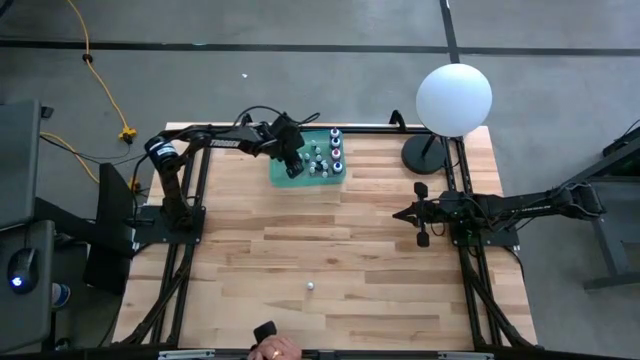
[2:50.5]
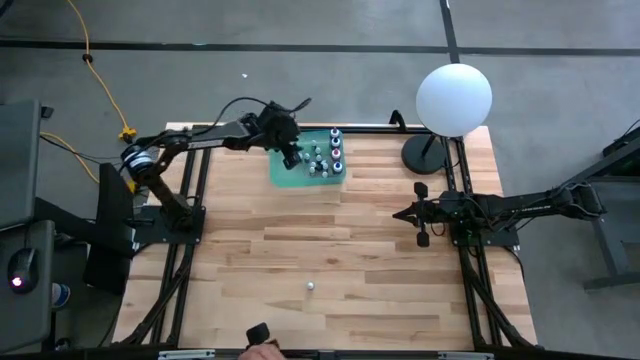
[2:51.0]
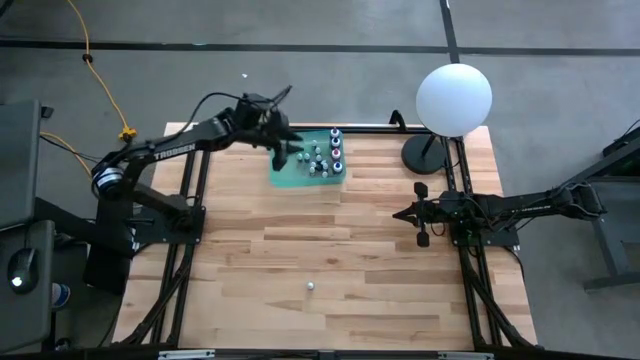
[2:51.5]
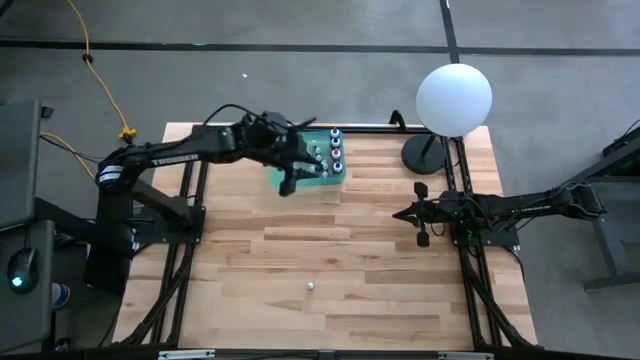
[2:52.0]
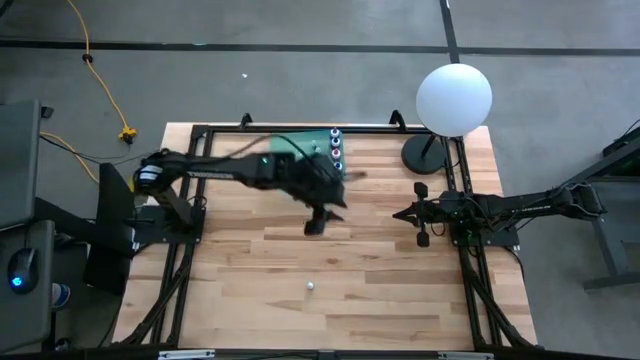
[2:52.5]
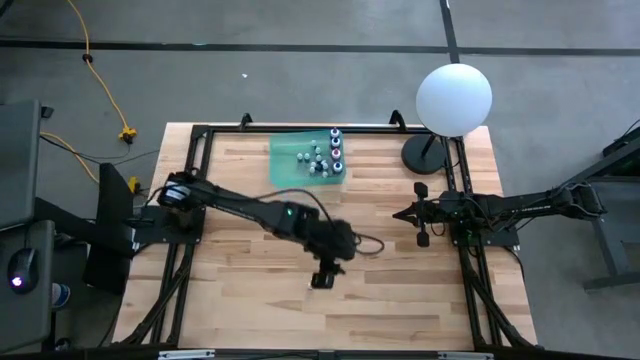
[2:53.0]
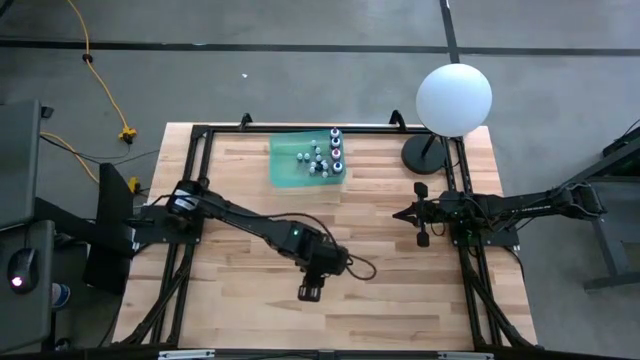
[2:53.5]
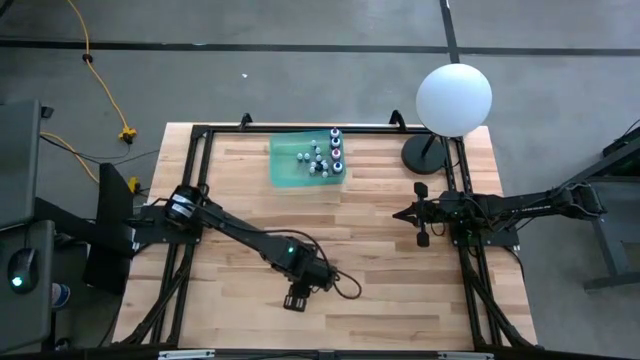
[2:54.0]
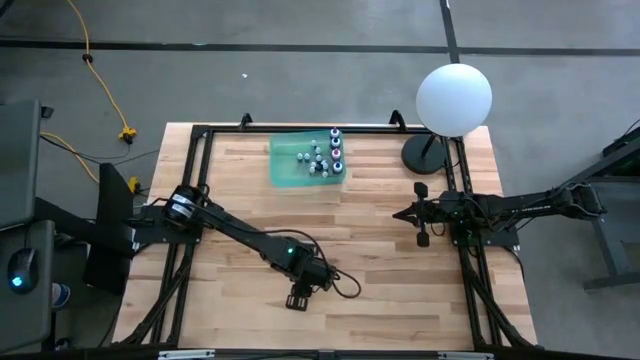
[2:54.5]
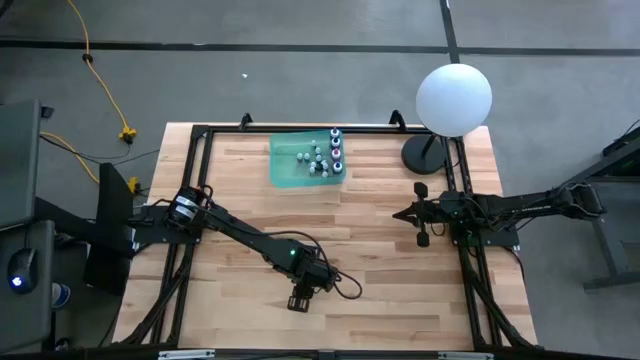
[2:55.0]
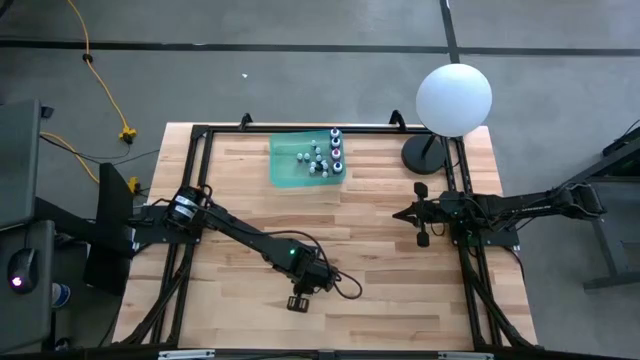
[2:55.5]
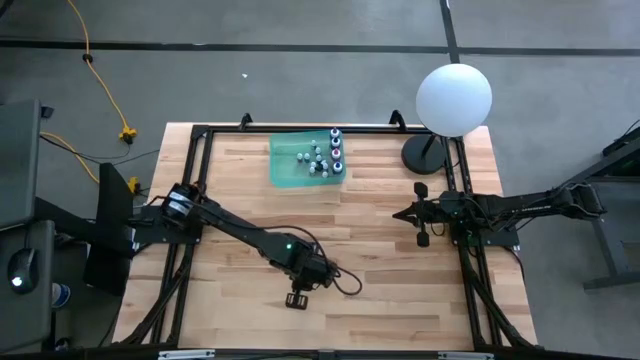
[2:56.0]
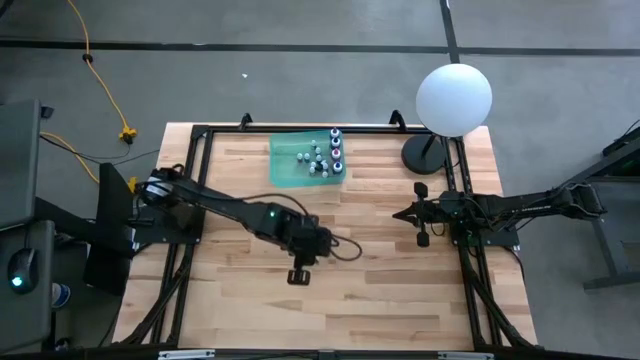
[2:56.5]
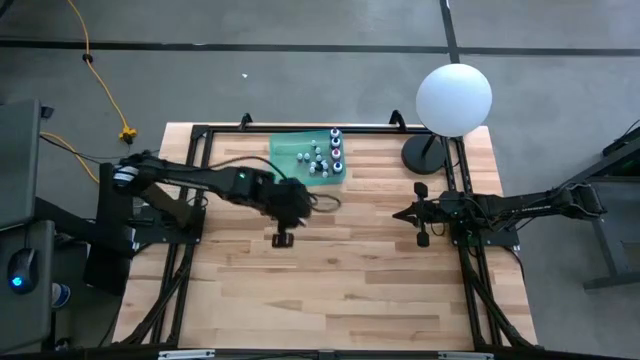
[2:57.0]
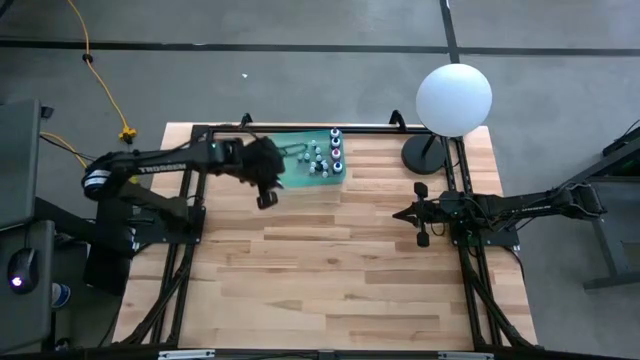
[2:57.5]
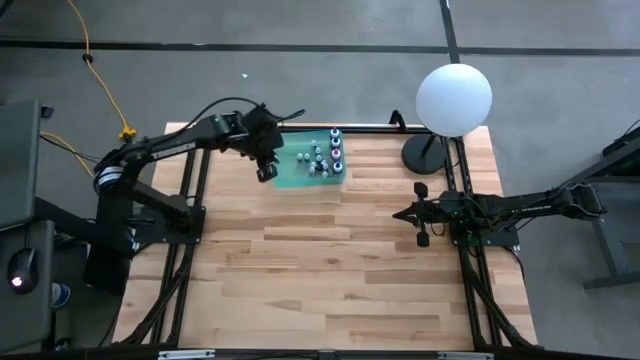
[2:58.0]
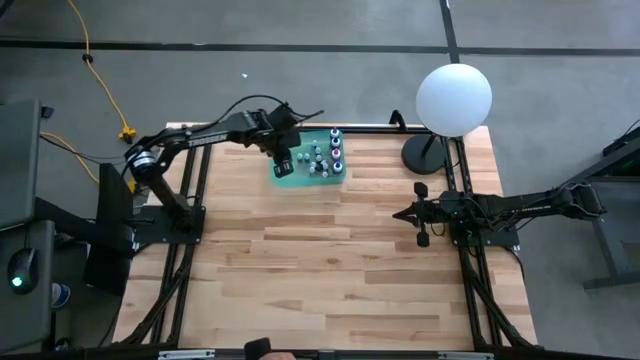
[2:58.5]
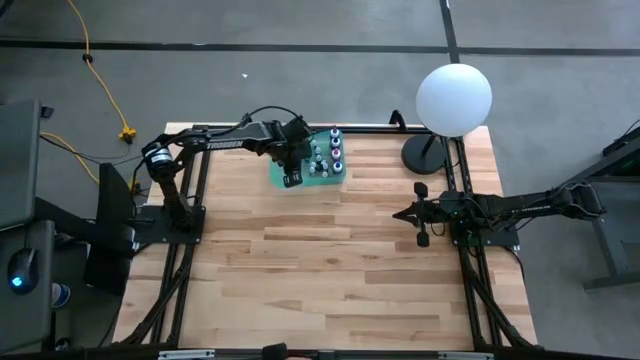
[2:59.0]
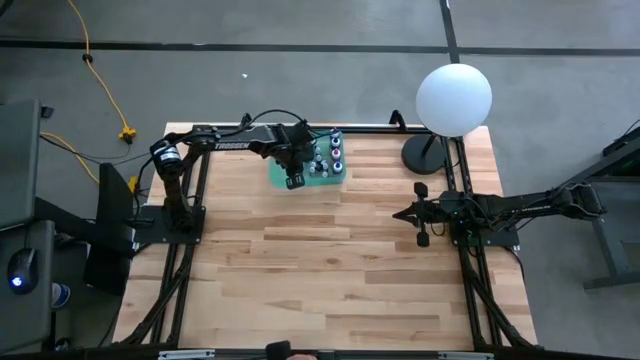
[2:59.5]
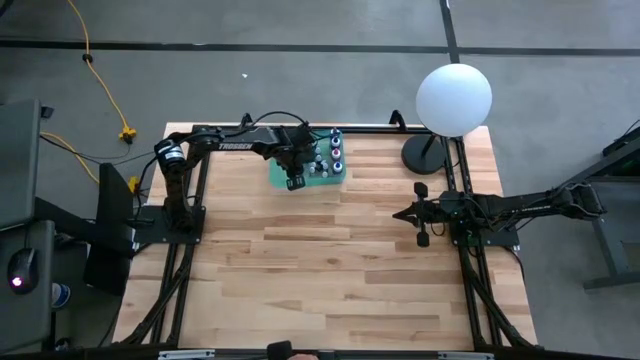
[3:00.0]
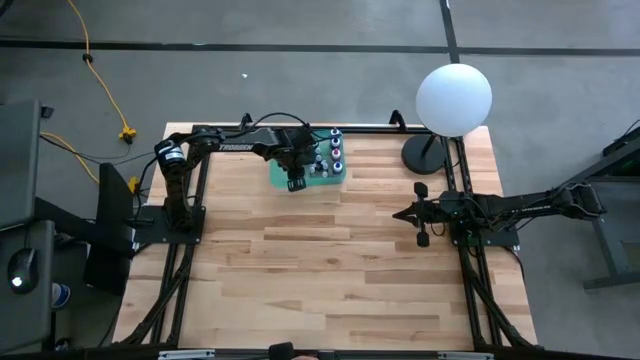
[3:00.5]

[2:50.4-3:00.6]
Task: Pick & Place food coloring
Put the small black food coloring bottle into the blue transparent bin

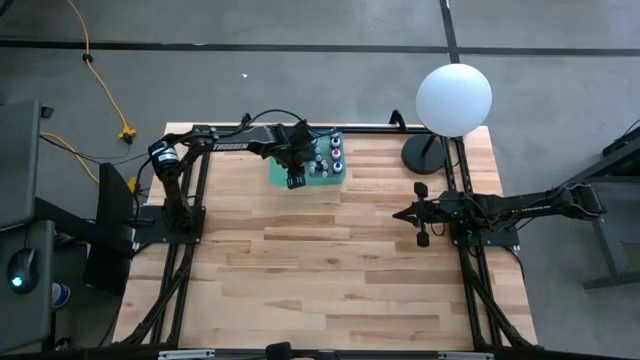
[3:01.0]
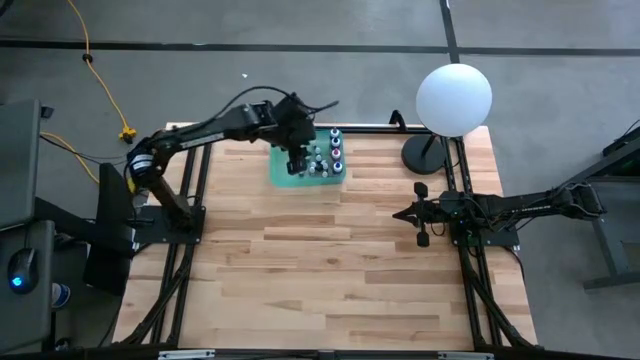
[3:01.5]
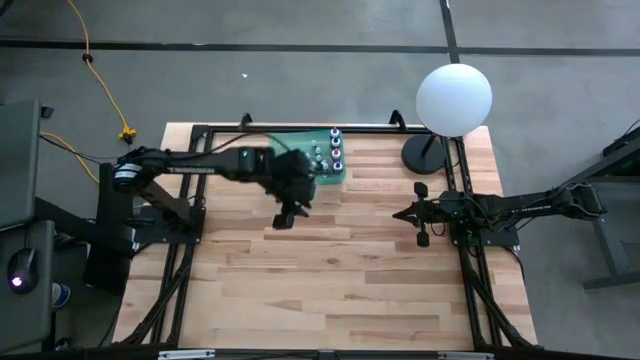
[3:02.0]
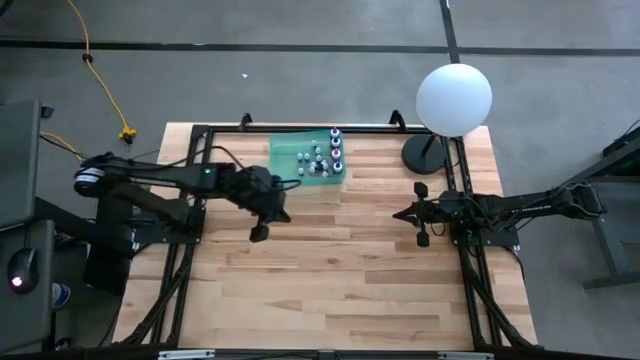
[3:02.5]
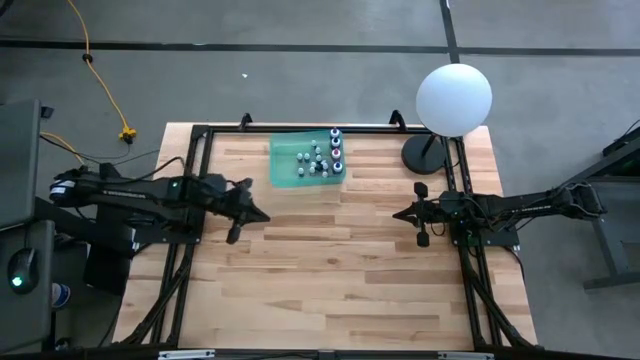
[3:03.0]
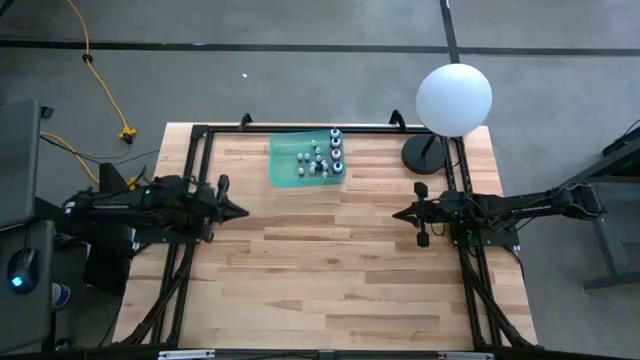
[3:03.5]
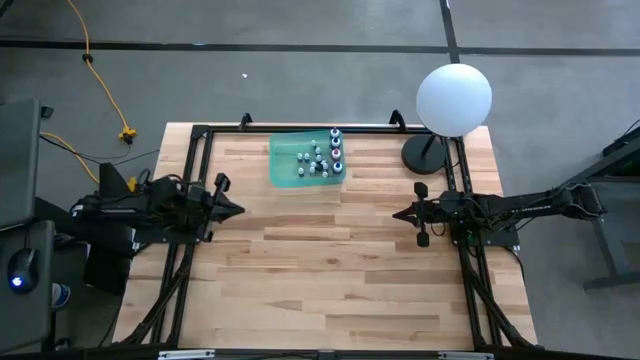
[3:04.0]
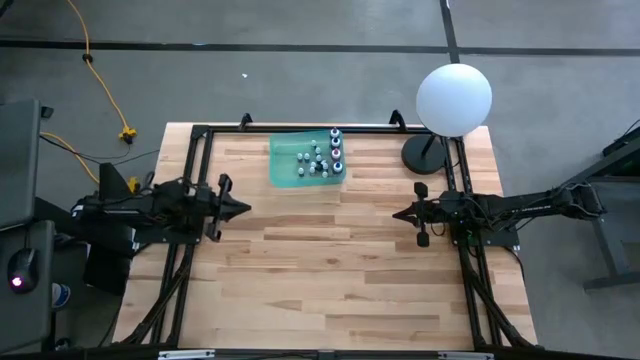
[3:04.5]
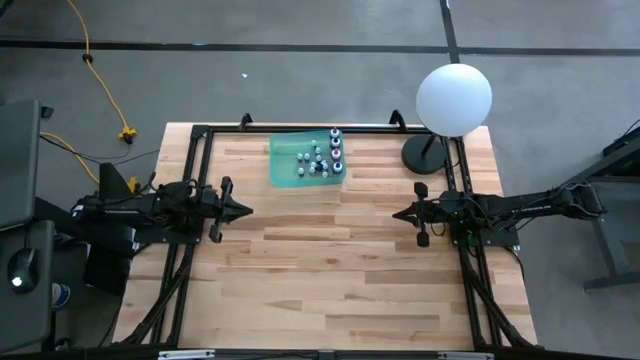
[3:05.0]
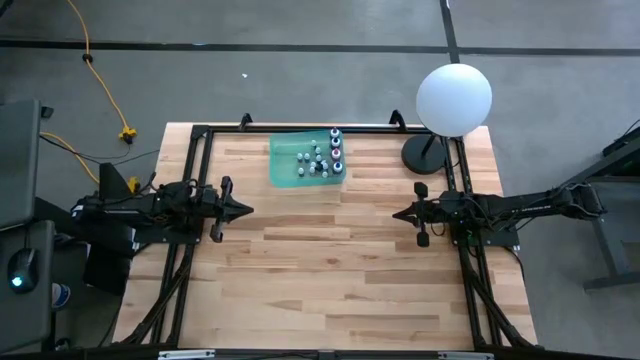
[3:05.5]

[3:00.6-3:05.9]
Return to Home Position
